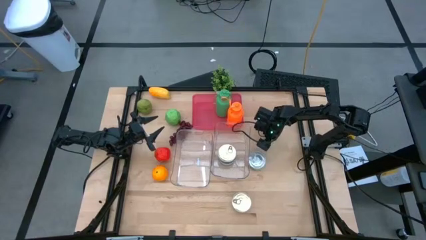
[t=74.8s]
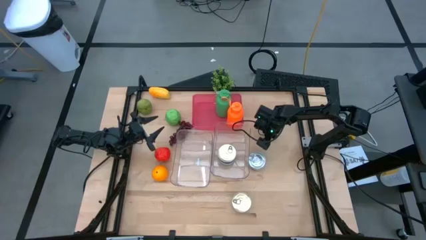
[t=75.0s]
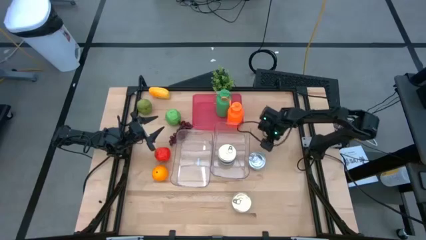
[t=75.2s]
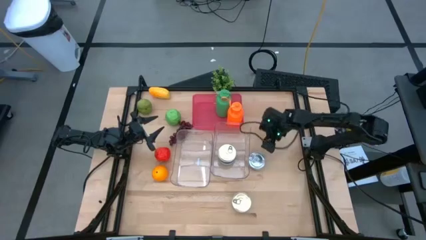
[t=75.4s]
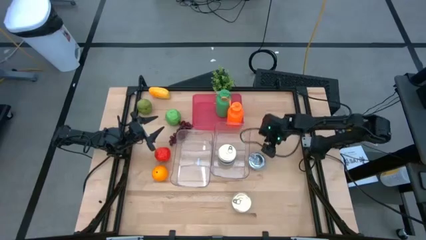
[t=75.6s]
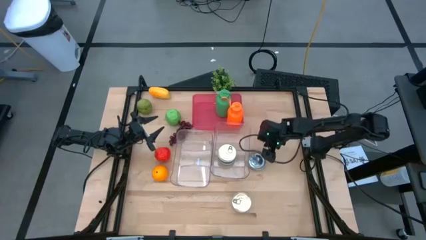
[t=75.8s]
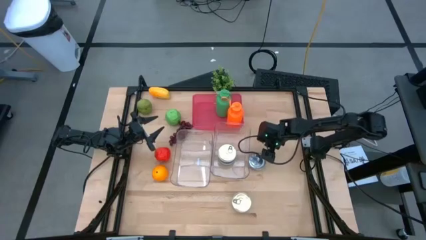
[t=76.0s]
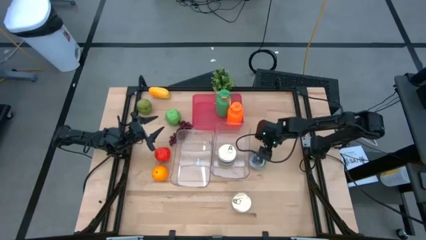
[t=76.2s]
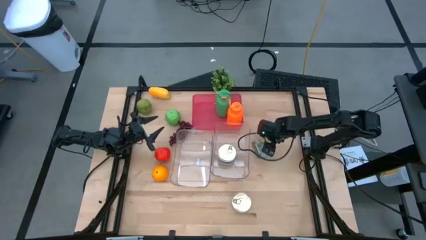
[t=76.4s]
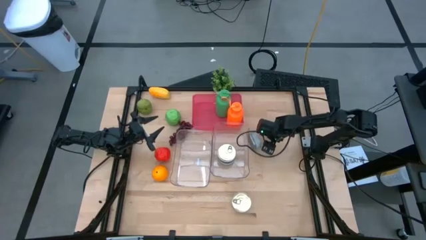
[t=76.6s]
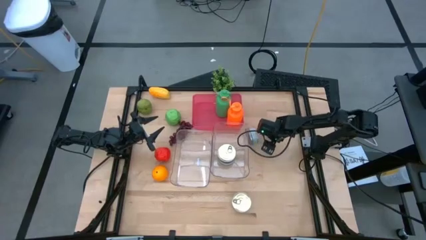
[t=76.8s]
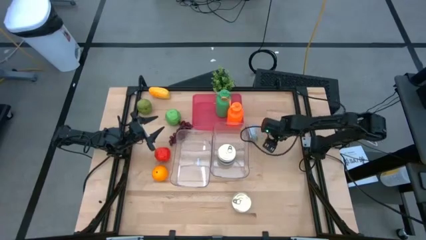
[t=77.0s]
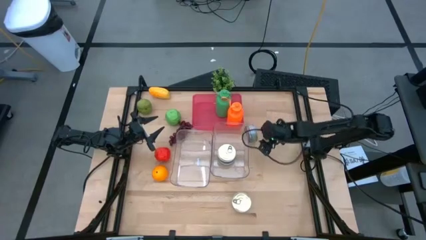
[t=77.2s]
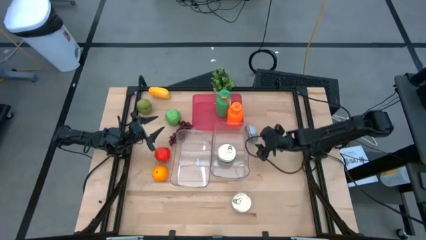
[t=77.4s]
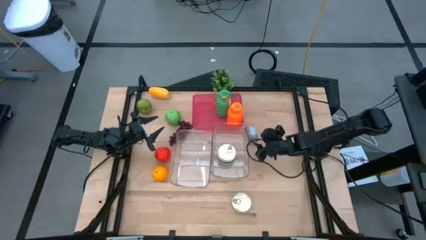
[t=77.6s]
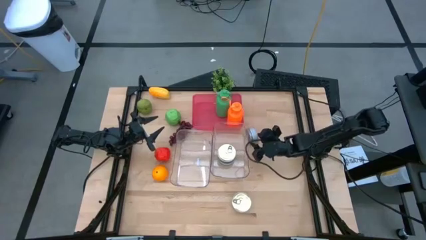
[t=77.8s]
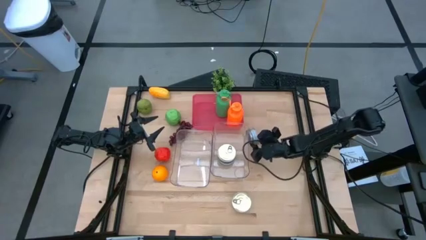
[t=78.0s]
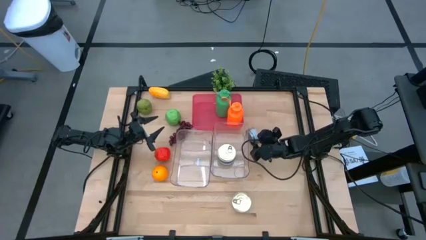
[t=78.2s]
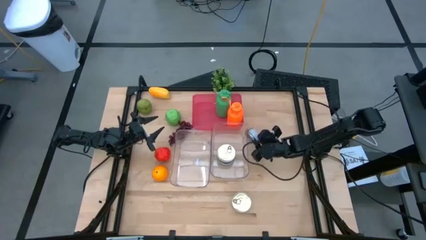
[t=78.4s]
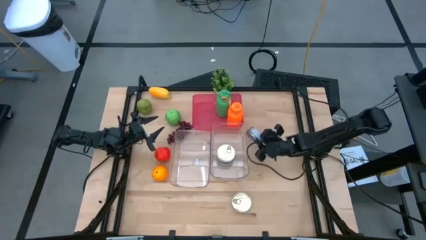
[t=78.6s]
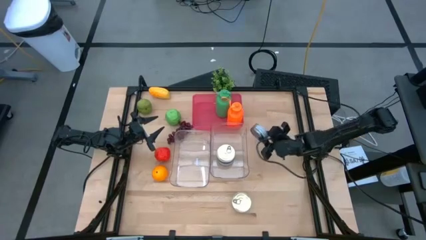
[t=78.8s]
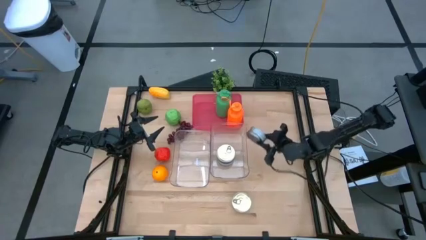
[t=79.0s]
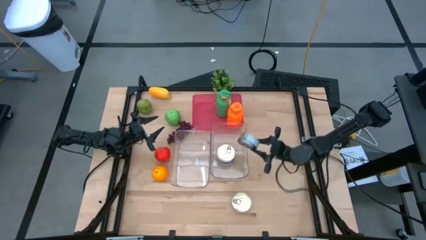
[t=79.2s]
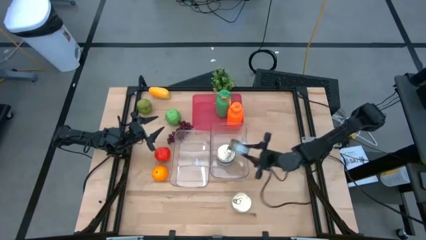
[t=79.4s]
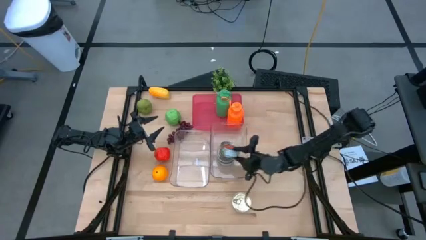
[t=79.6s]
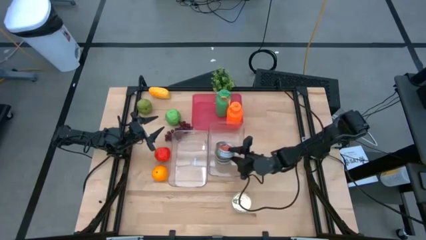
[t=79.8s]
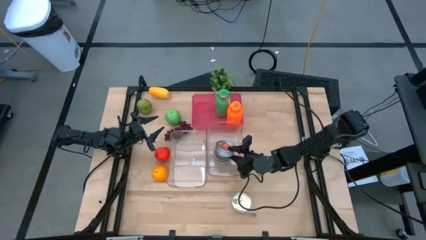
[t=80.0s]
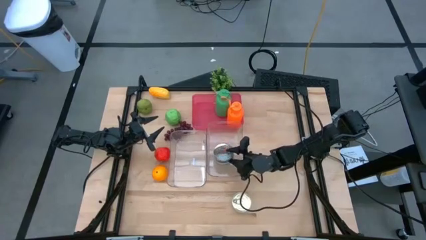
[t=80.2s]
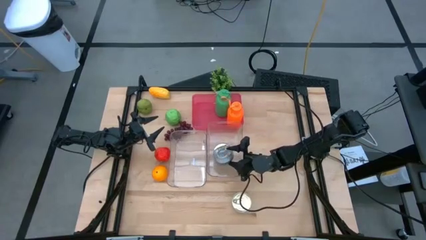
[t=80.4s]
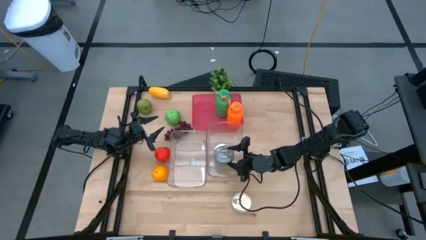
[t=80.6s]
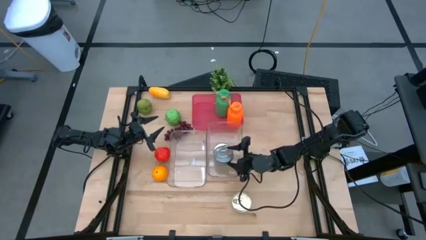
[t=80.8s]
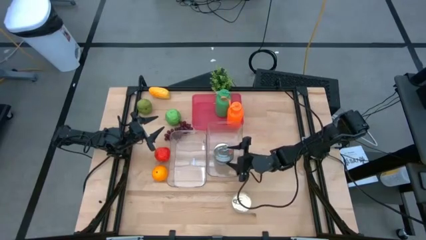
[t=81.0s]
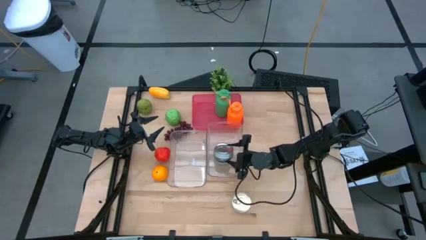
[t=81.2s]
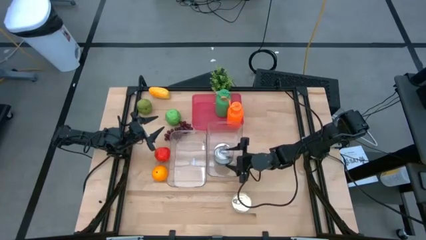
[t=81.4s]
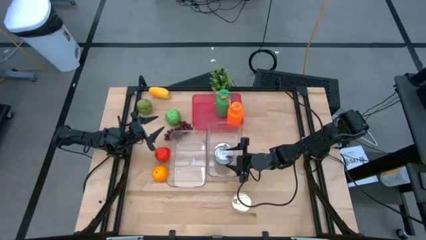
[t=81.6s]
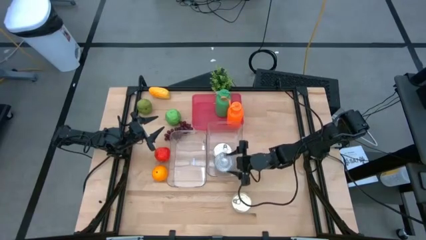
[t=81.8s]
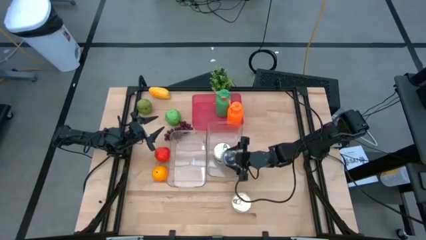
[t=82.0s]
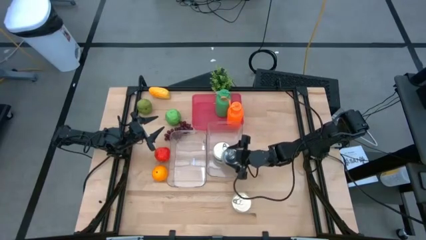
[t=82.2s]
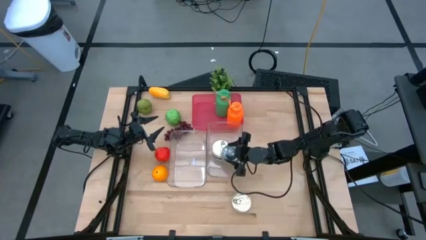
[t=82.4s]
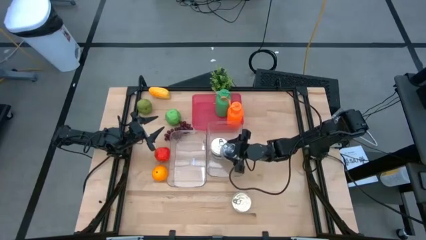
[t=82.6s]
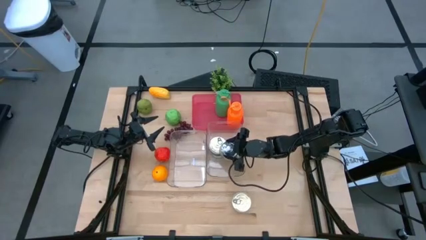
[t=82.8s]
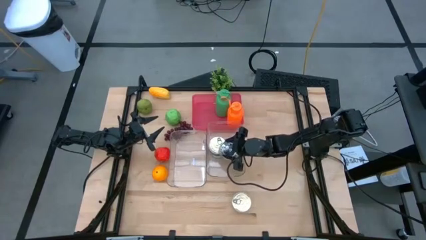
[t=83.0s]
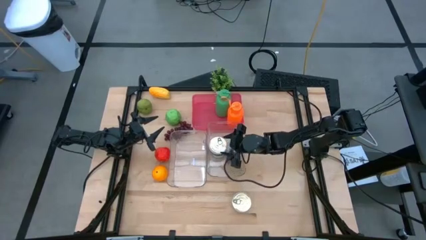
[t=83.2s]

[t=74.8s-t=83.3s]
Task: Pick & Place Food Item
Put the green tuna can into the right transparent bin

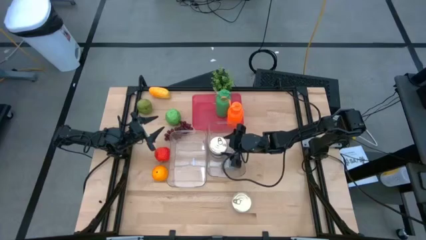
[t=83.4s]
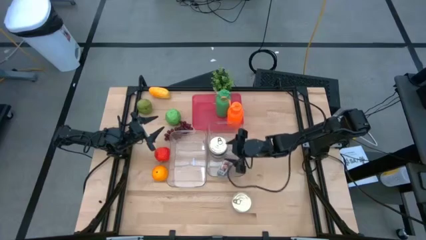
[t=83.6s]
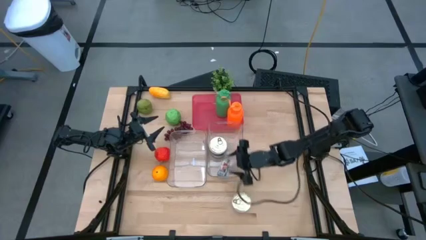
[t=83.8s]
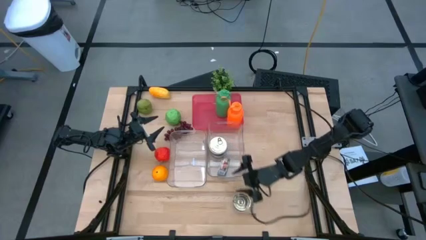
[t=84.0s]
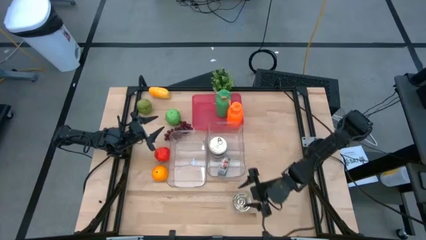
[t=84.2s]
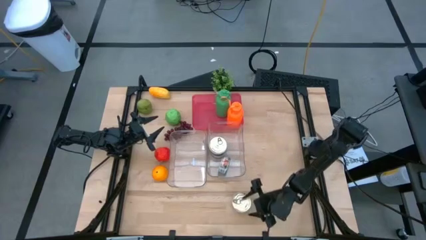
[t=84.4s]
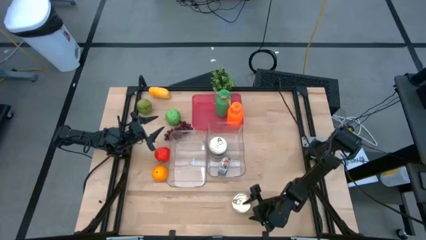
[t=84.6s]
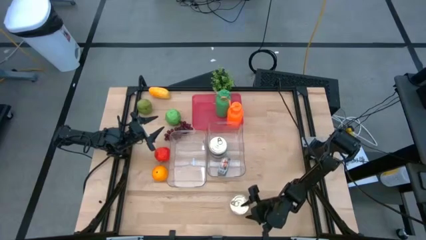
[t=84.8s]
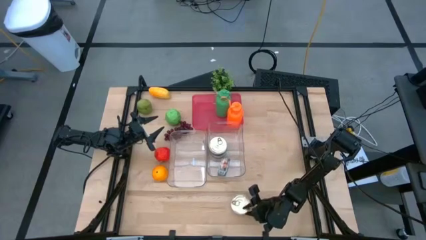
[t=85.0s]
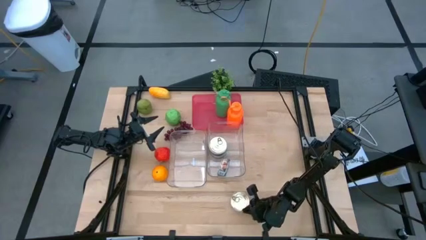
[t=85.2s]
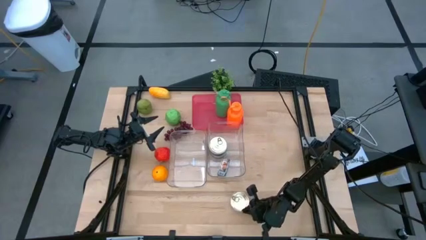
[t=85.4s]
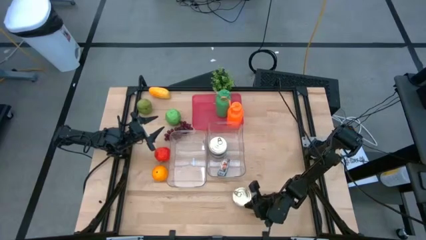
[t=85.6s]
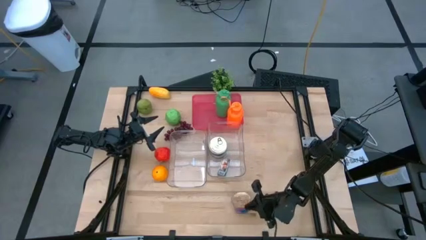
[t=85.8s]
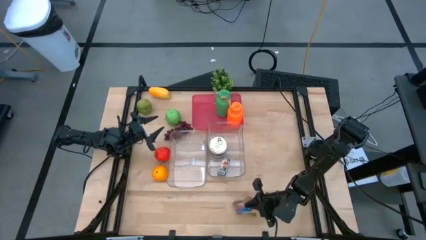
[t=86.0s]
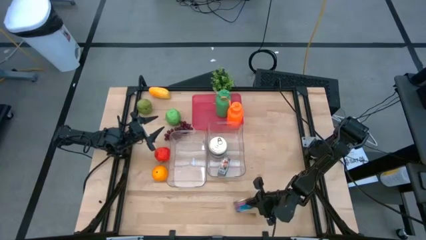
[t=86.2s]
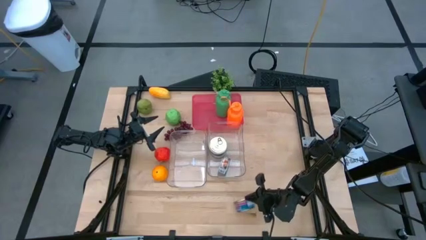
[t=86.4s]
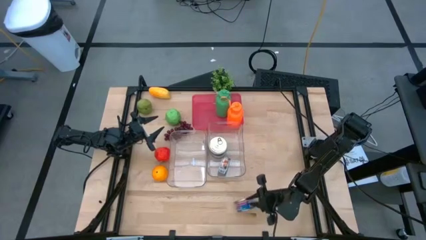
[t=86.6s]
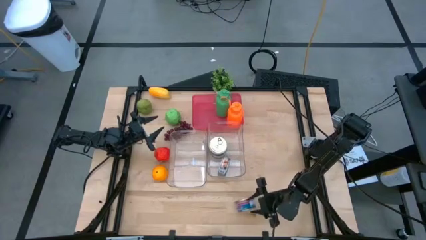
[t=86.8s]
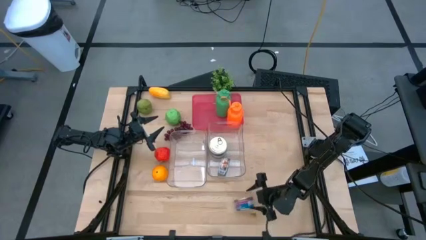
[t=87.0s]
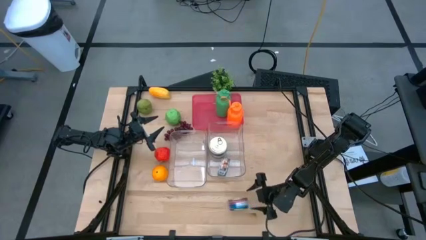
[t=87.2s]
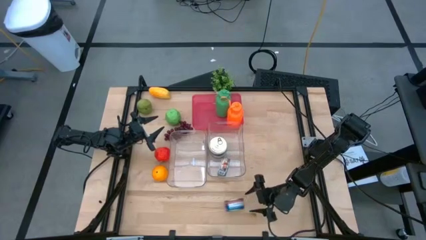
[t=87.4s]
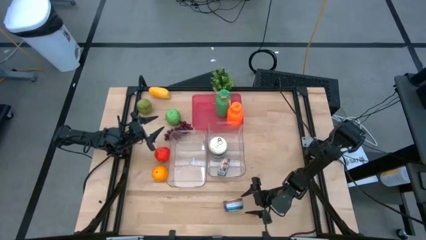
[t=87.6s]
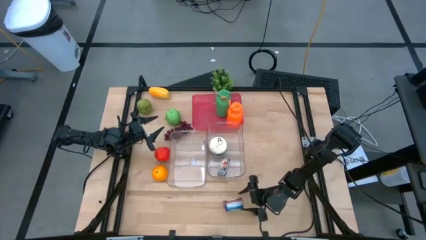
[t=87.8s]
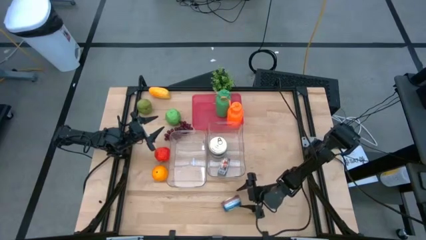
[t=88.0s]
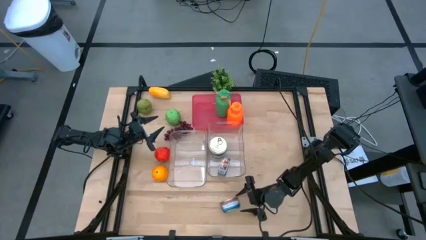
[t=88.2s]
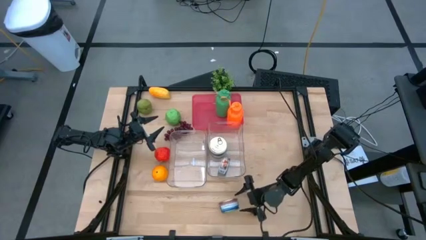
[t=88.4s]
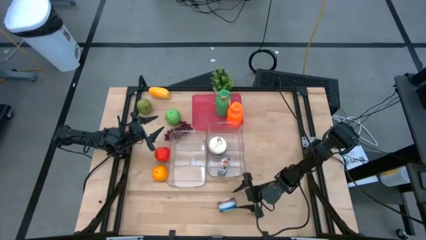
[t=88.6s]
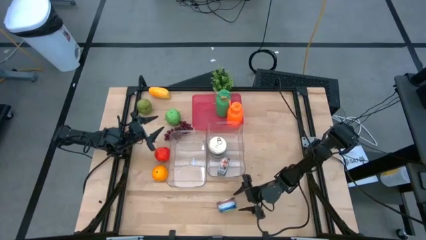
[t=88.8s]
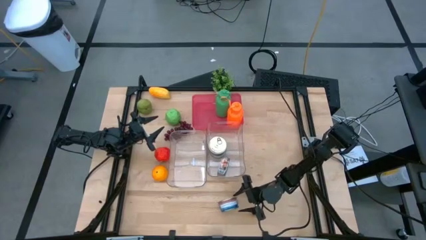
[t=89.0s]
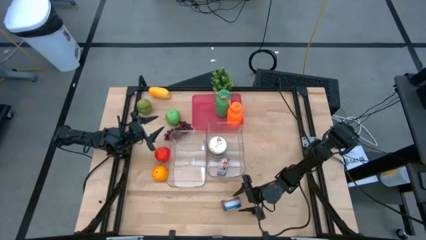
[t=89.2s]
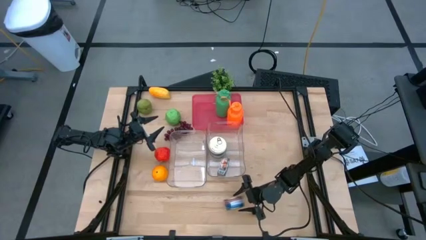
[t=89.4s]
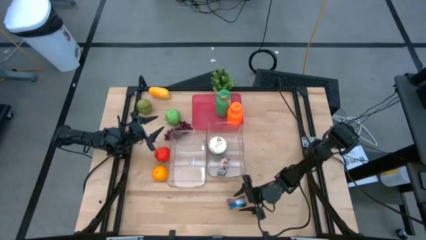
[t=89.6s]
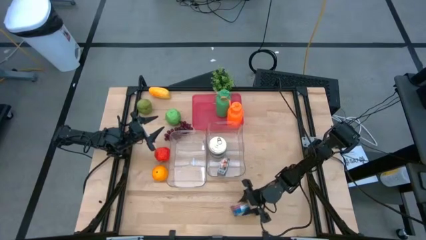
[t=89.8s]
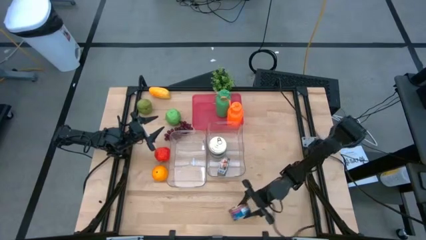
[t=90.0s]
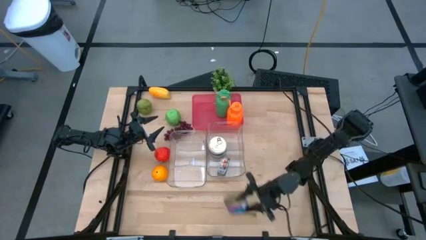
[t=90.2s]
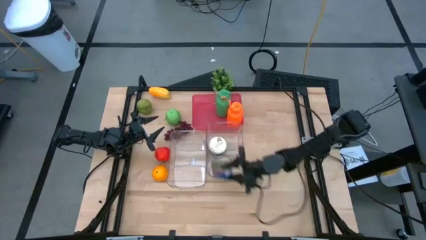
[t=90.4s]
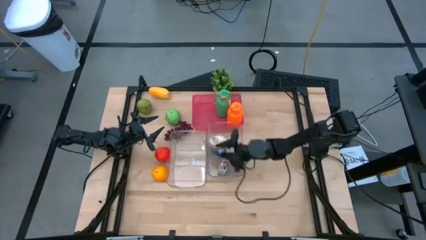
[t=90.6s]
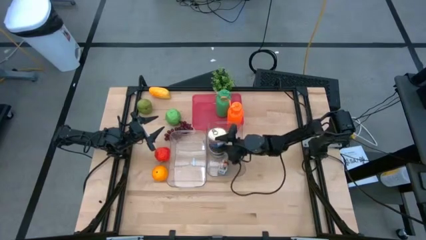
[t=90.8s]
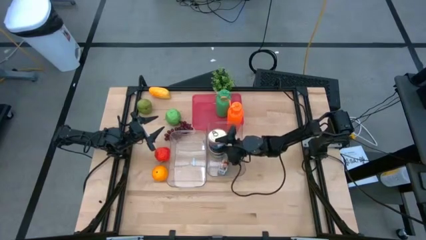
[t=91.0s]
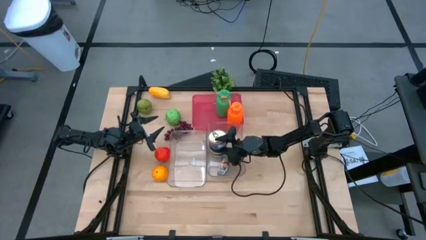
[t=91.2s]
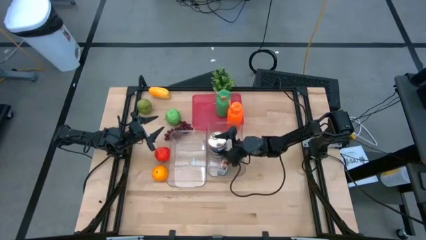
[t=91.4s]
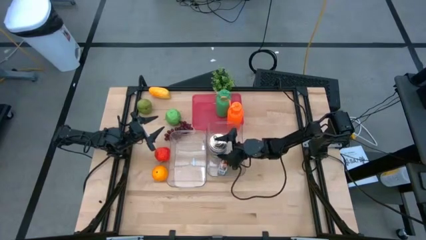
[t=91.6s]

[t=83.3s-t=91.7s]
Put the blue and pink tuna can into the right transparent bin
